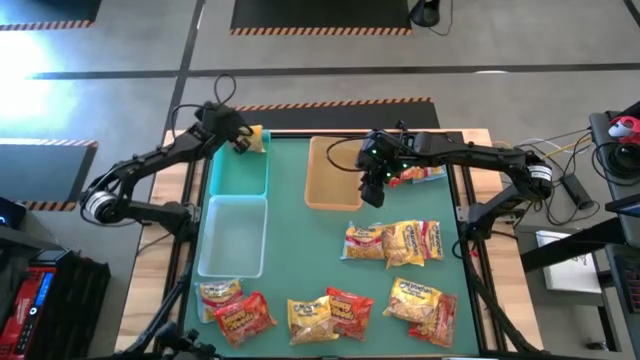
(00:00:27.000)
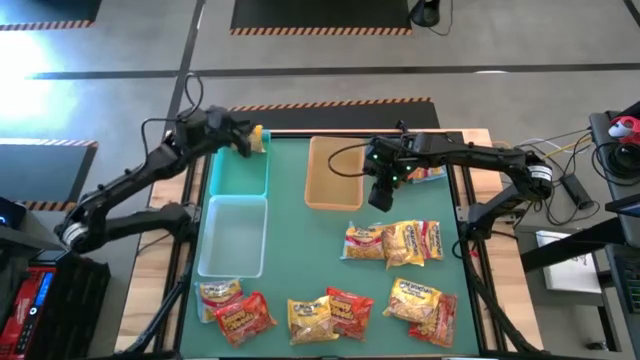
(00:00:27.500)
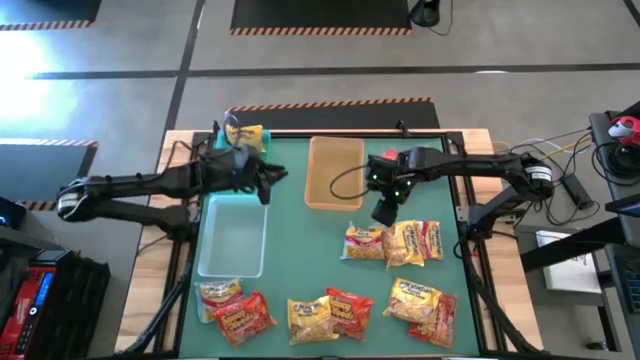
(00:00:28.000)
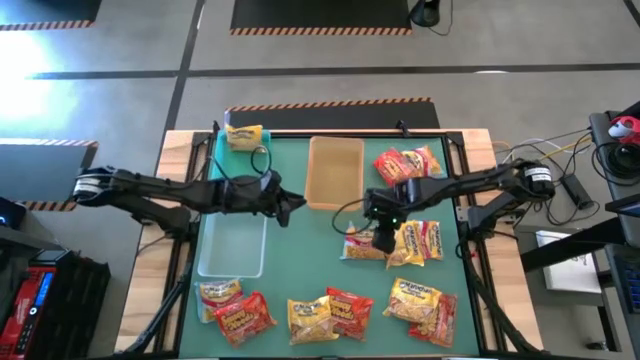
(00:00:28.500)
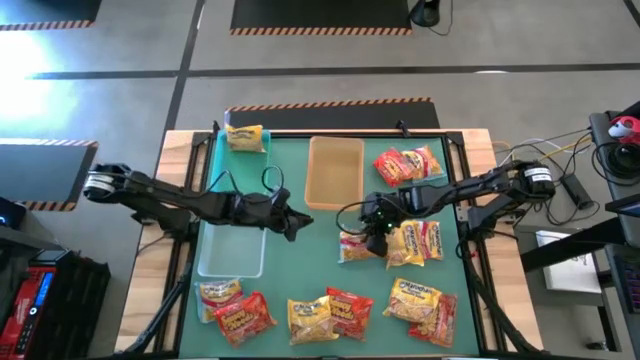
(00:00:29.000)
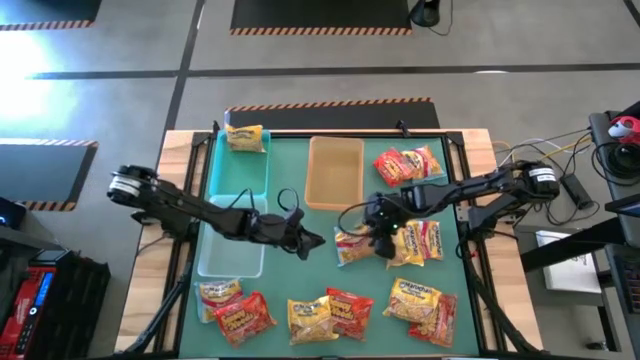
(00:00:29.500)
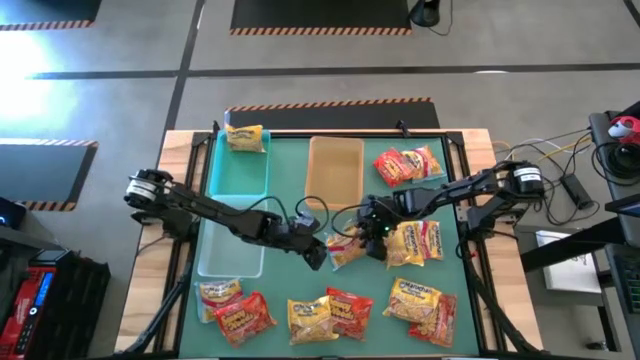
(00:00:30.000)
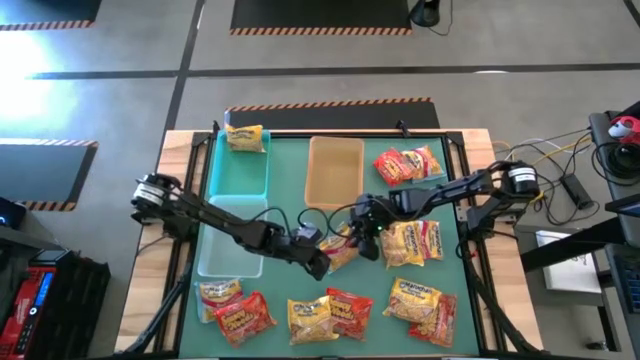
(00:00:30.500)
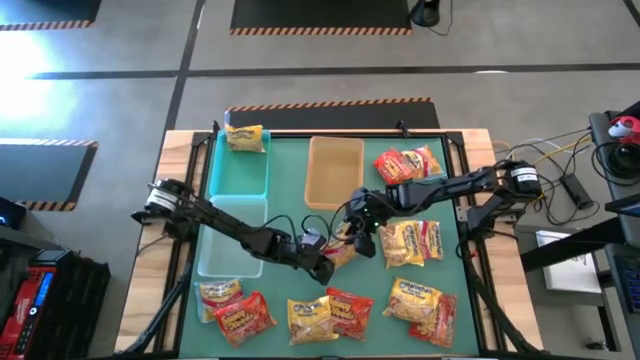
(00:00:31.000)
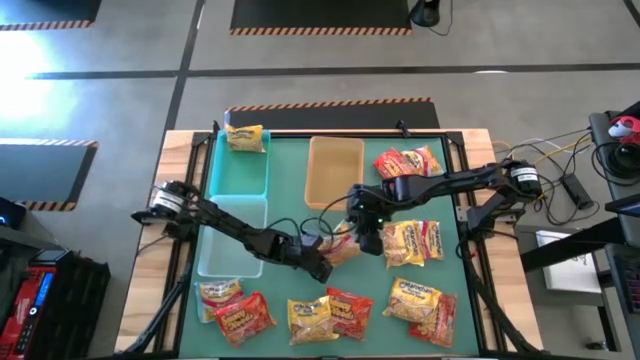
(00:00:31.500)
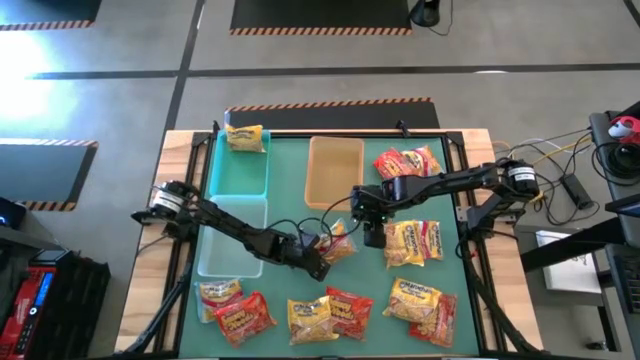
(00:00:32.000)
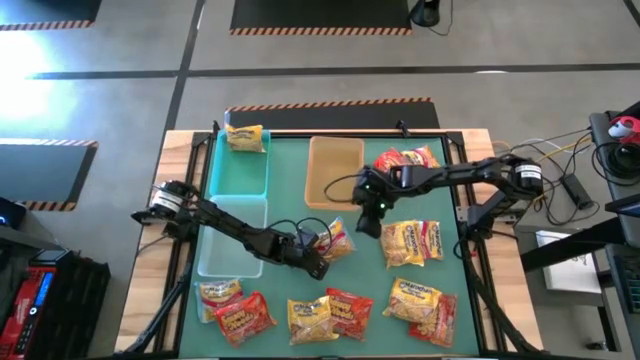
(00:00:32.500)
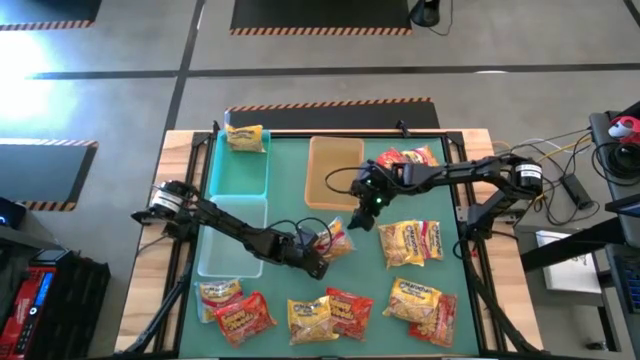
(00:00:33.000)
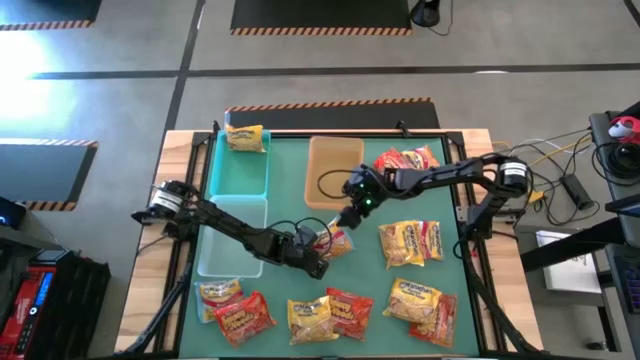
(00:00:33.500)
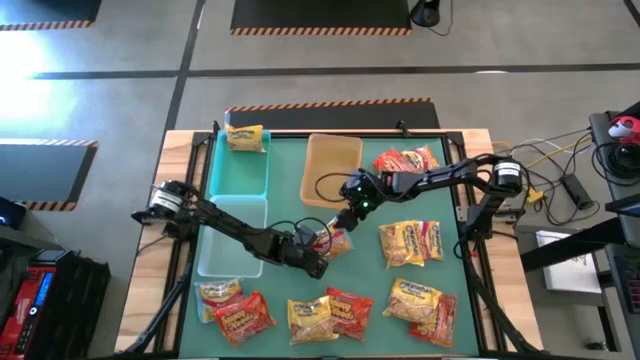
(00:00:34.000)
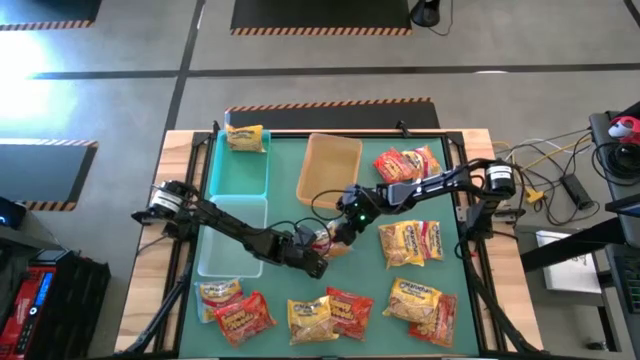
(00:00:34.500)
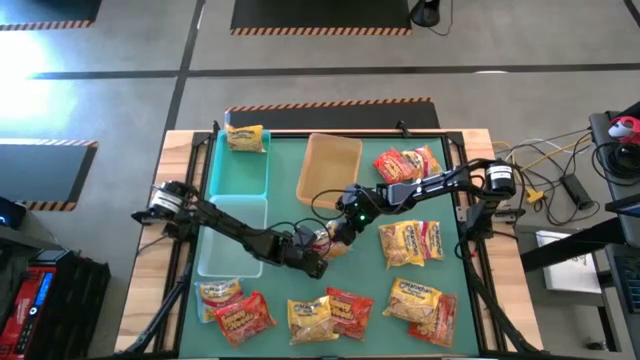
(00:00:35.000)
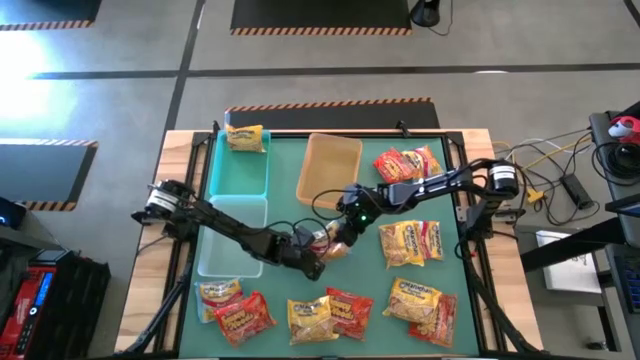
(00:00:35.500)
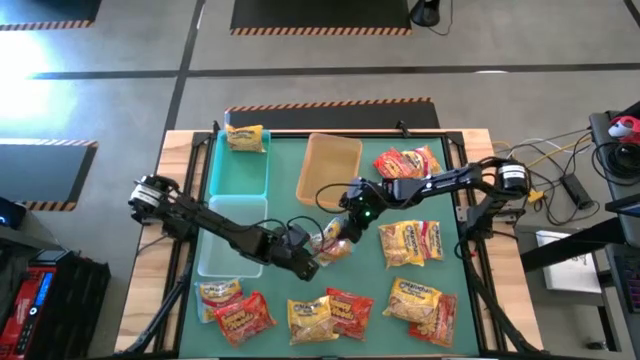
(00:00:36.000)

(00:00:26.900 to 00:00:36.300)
Task: Sort Maruchan noodles
Put the blue noodle pack into the orange bin

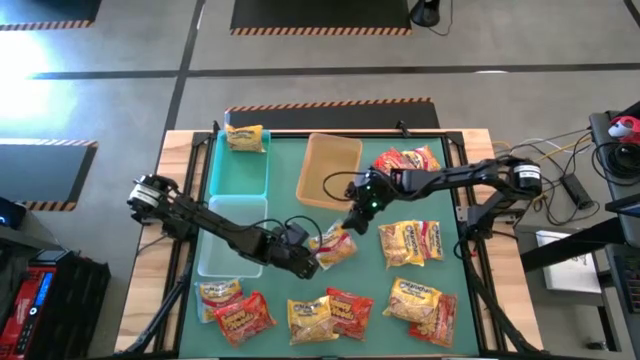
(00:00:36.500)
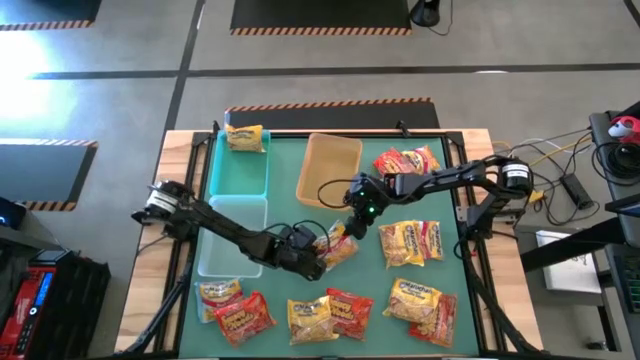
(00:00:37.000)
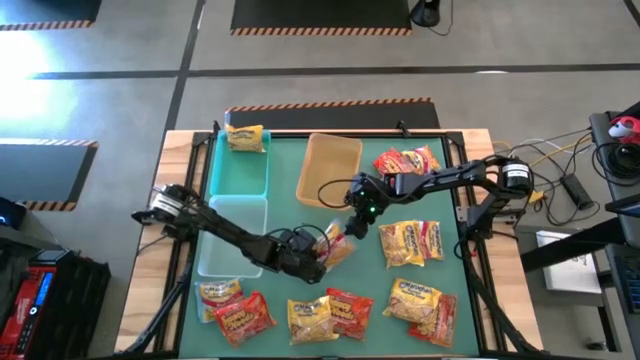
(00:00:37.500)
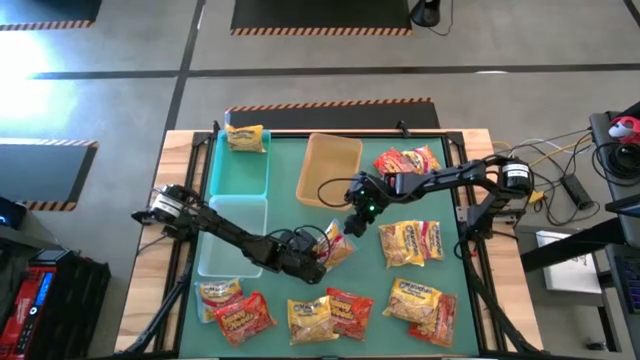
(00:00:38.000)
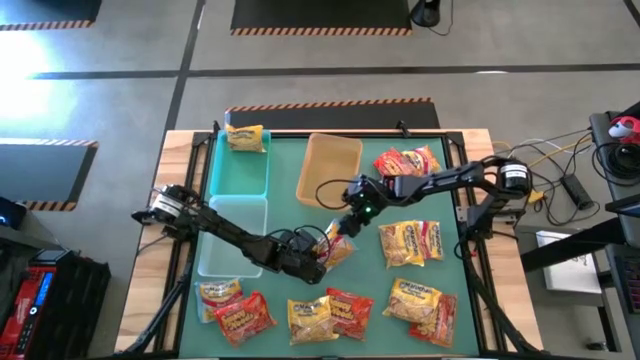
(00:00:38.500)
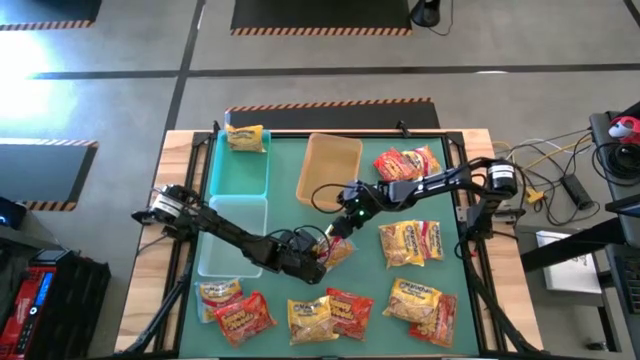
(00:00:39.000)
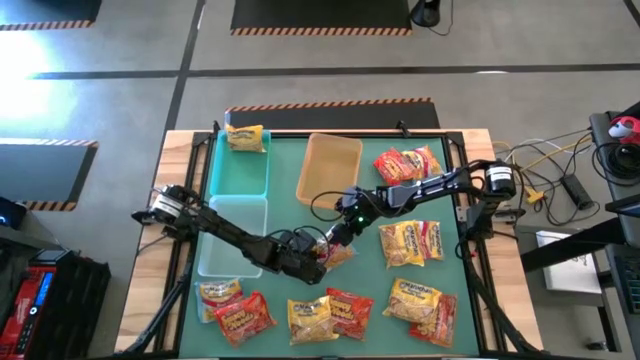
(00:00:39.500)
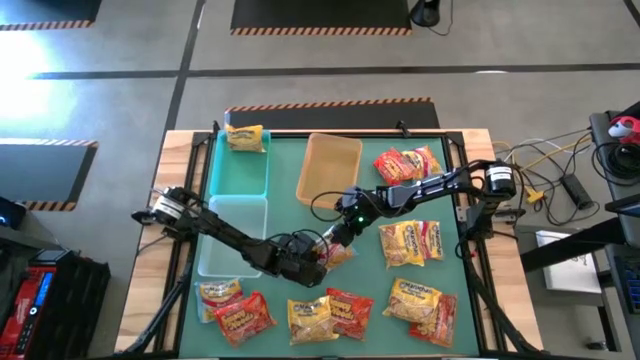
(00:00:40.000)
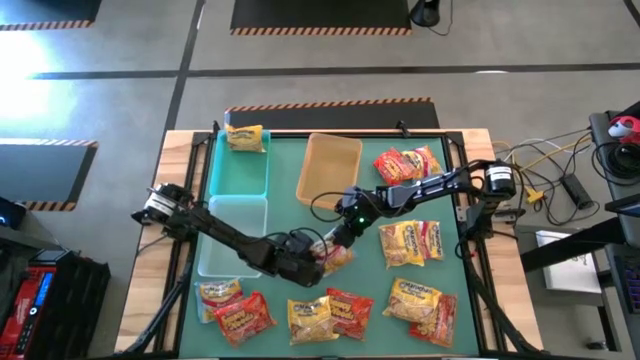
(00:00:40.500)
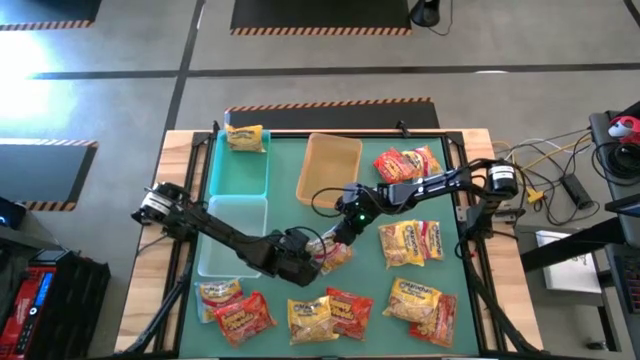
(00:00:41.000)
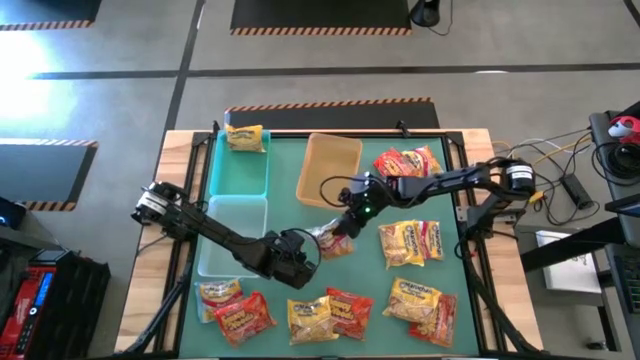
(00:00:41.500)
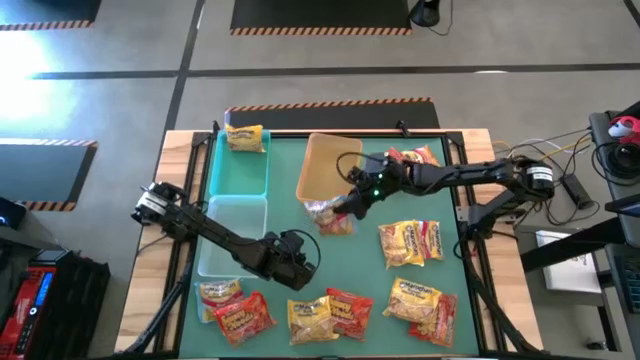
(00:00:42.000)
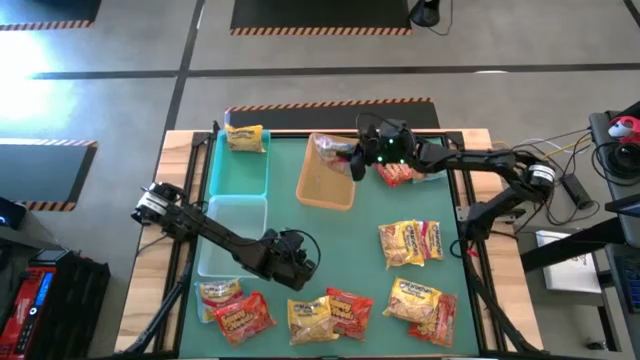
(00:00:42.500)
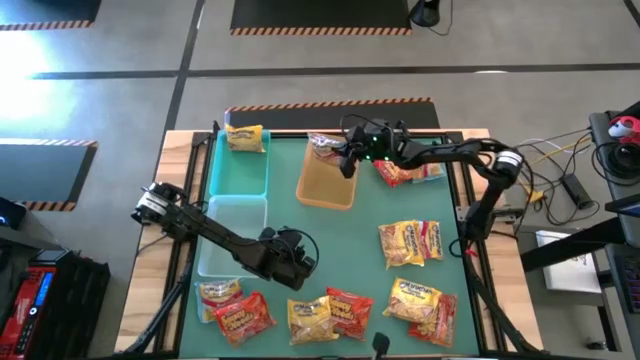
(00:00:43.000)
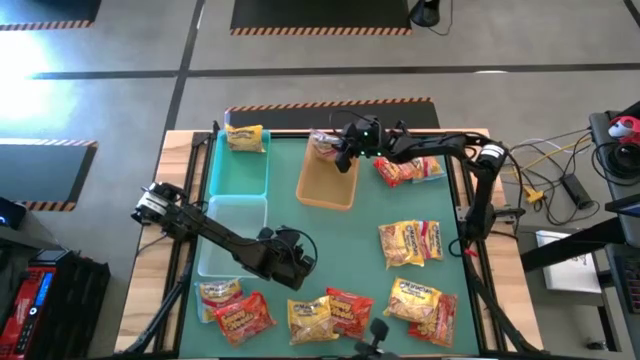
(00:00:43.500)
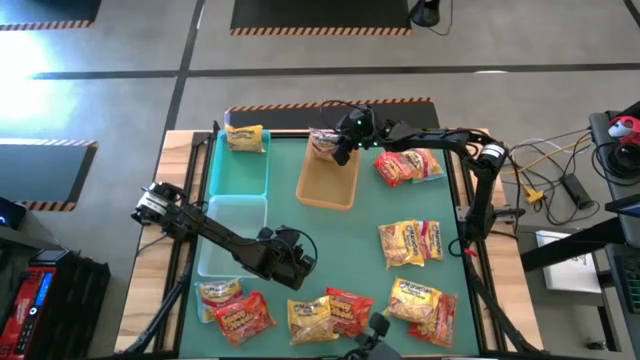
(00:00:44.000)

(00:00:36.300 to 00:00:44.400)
Put the blue noodle pack into the orange bin

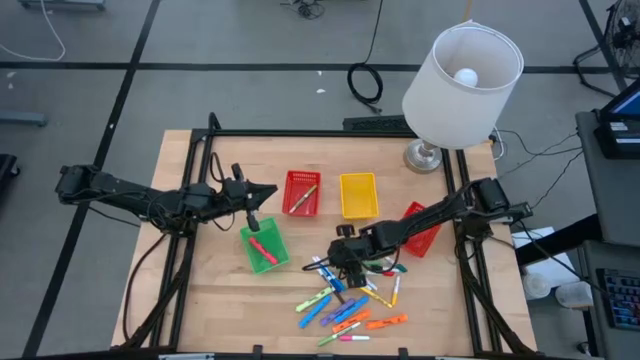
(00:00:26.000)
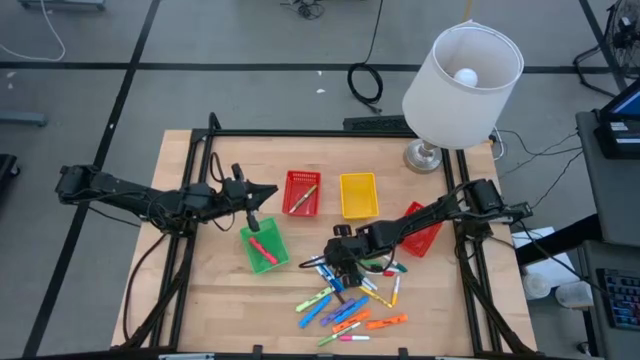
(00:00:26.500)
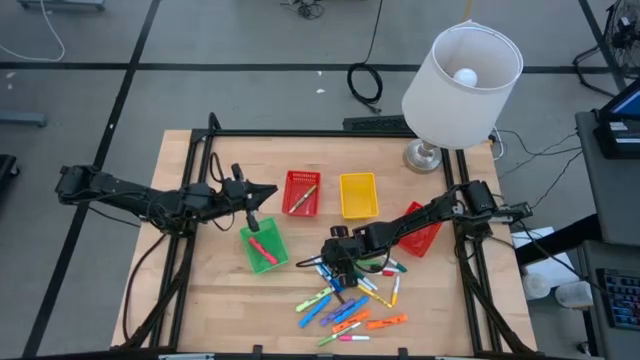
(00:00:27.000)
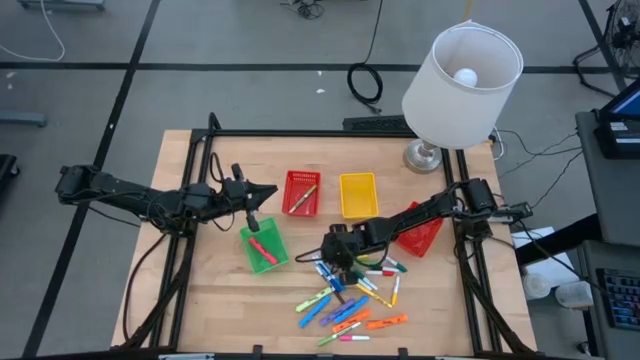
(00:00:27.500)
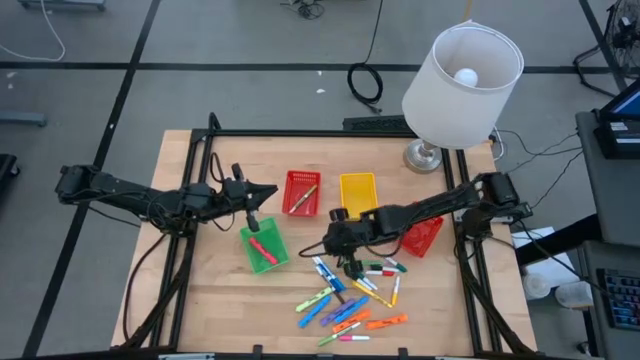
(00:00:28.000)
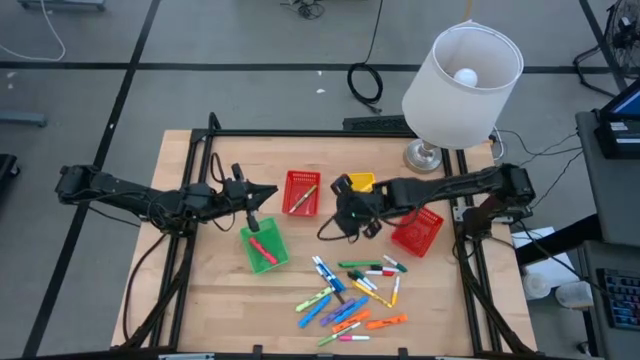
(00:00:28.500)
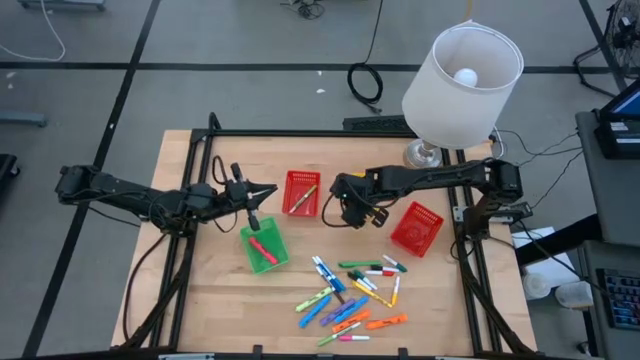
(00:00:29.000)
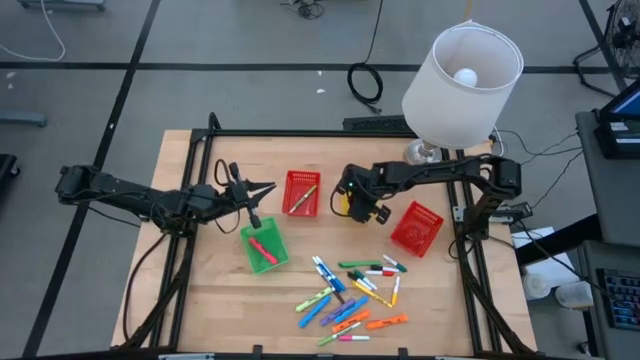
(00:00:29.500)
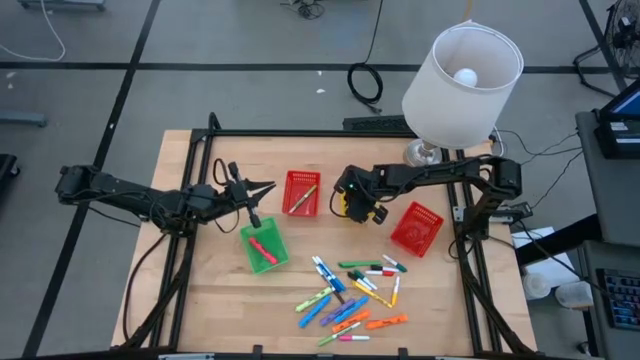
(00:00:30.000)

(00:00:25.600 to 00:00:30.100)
Task: Pick & Place Markers
Put the top yellow pen into the yellow bin
